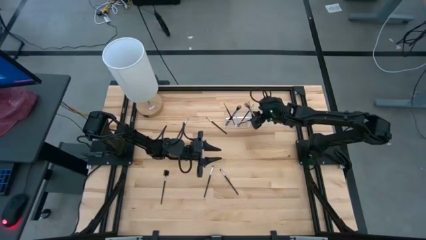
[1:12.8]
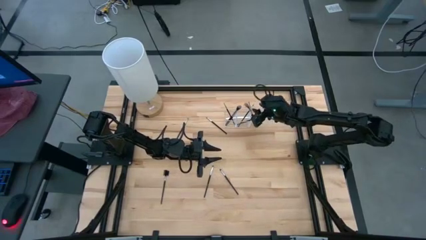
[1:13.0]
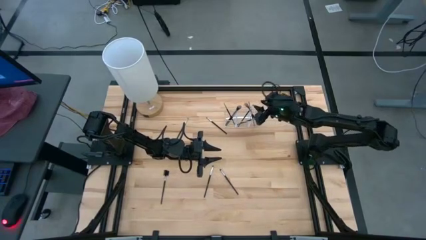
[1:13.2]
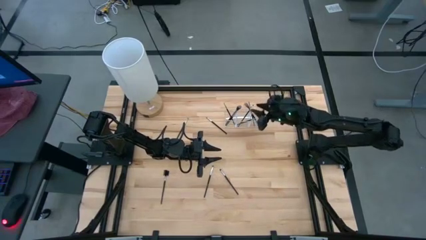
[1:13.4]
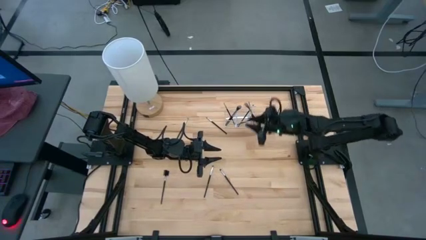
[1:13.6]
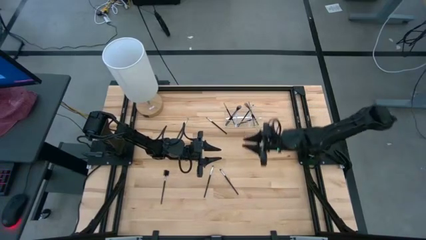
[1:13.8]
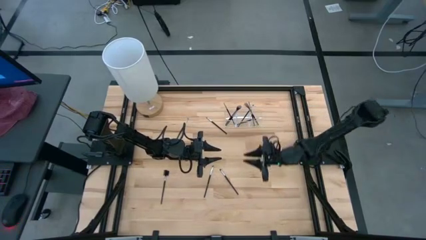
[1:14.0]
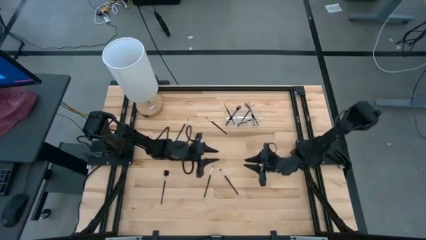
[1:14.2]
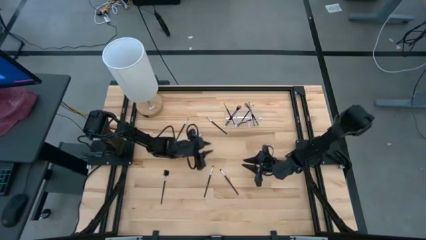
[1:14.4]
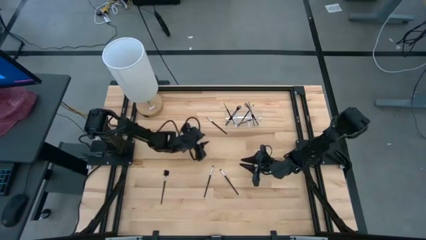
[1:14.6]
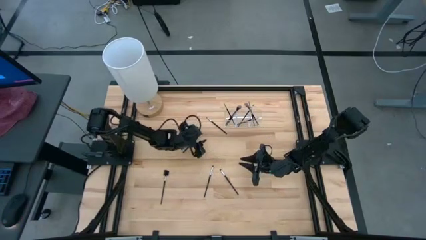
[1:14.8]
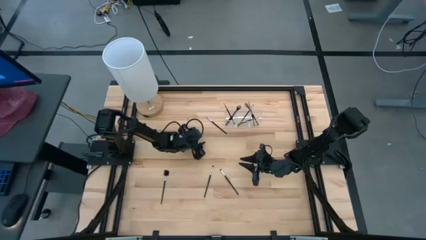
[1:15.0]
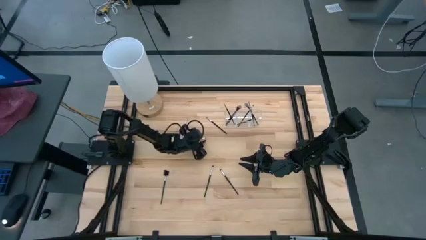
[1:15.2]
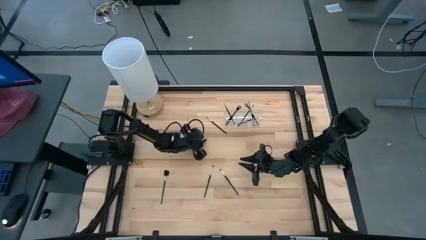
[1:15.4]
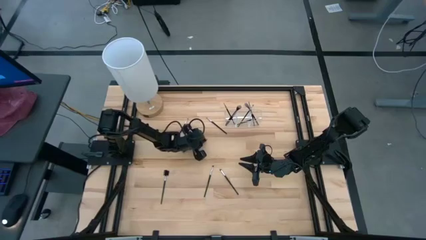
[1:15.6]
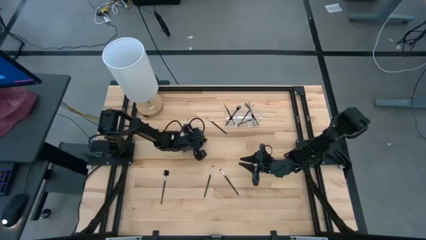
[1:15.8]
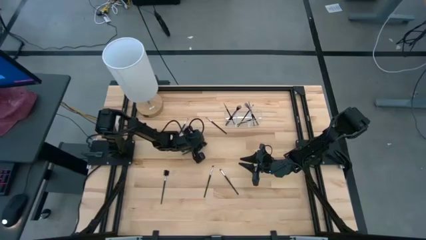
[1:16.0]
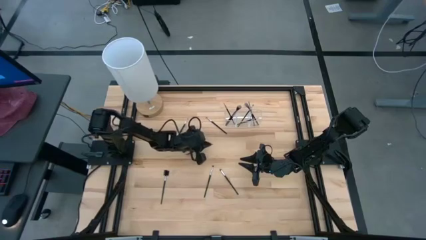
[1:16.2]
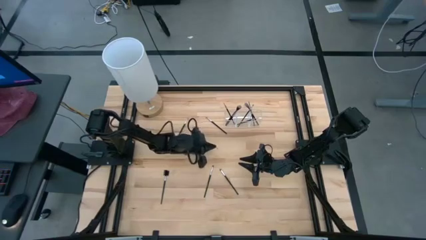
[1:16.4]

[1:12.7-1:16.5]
Task: Put items in baskets/containers
Put the black eyeshadow brush into the transparent organizer

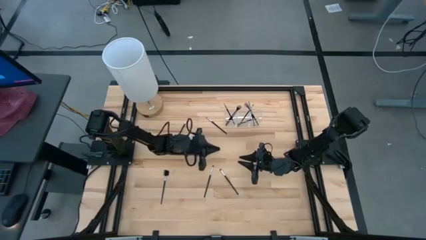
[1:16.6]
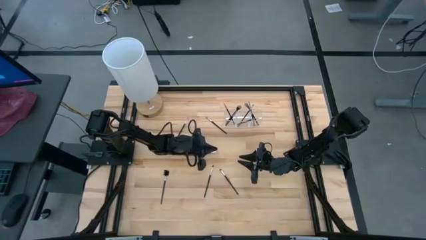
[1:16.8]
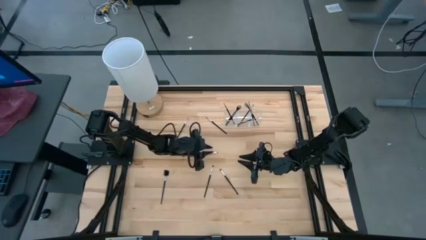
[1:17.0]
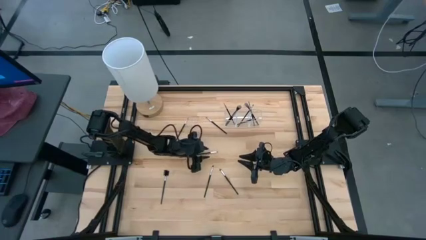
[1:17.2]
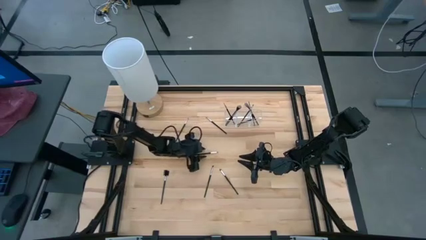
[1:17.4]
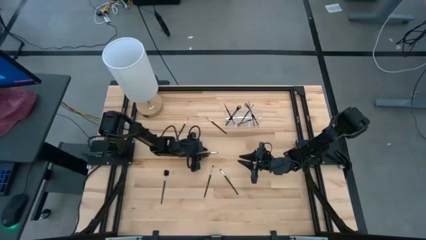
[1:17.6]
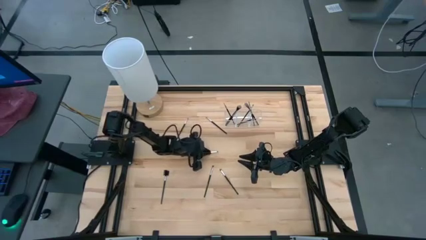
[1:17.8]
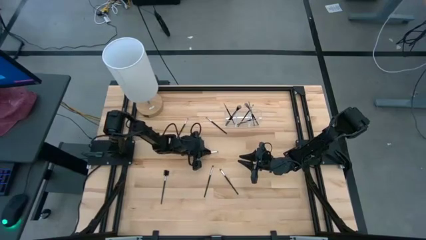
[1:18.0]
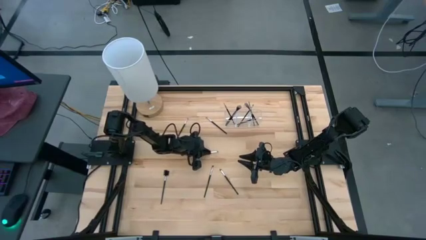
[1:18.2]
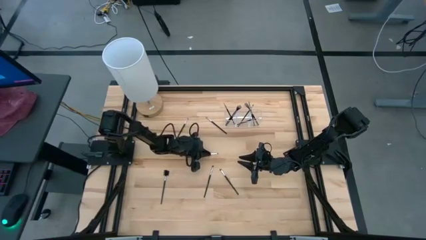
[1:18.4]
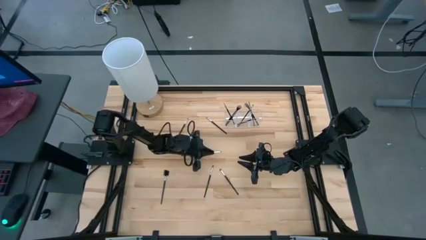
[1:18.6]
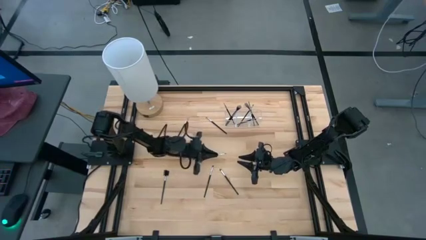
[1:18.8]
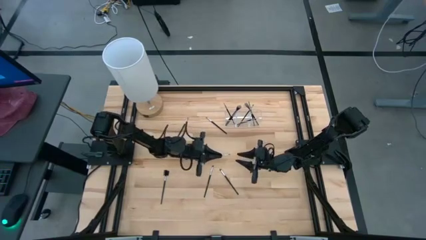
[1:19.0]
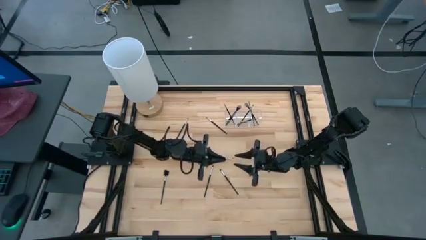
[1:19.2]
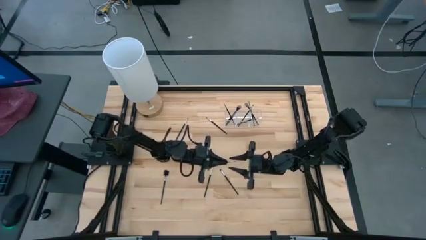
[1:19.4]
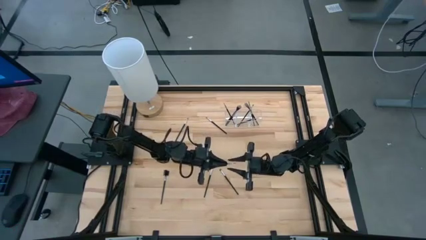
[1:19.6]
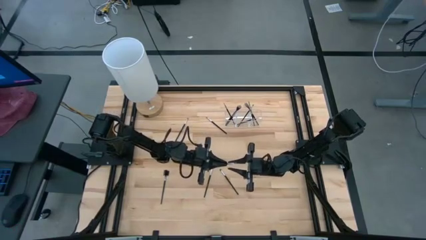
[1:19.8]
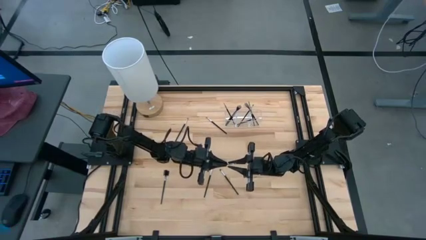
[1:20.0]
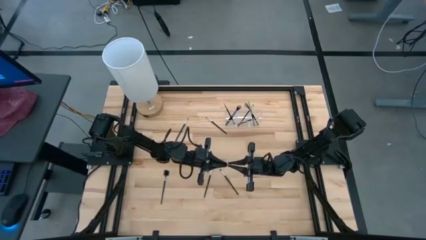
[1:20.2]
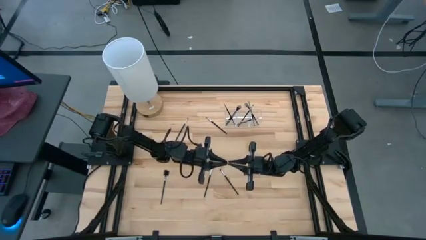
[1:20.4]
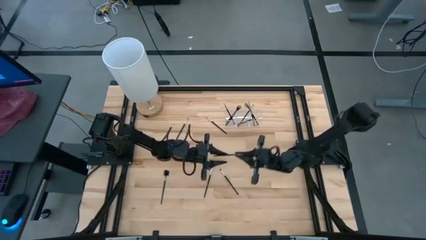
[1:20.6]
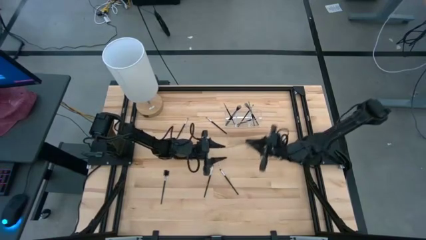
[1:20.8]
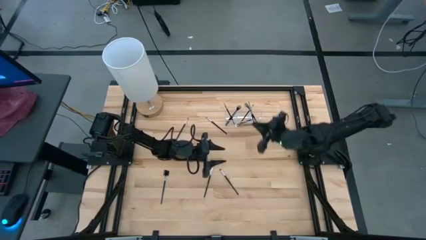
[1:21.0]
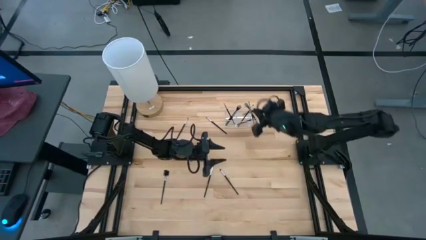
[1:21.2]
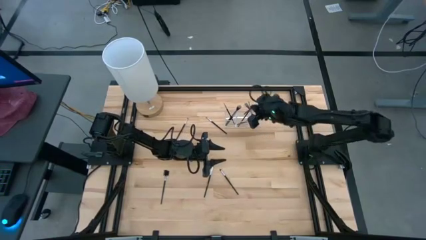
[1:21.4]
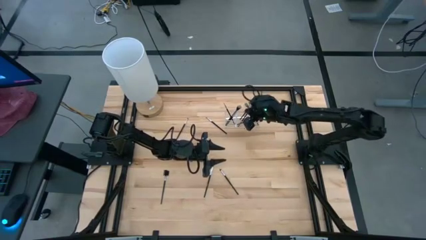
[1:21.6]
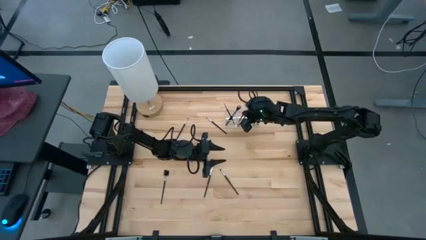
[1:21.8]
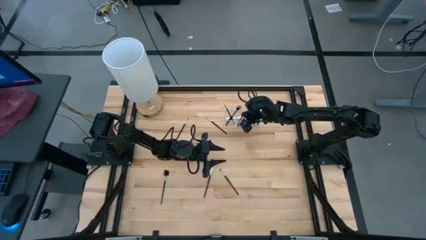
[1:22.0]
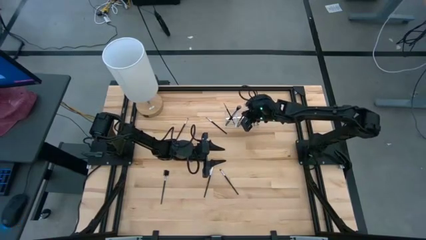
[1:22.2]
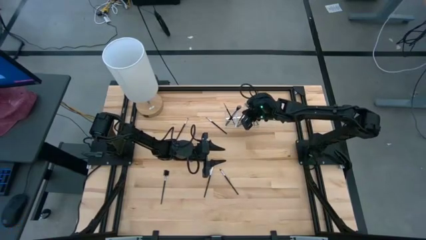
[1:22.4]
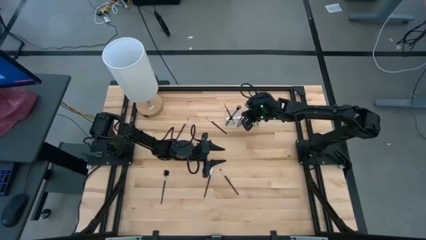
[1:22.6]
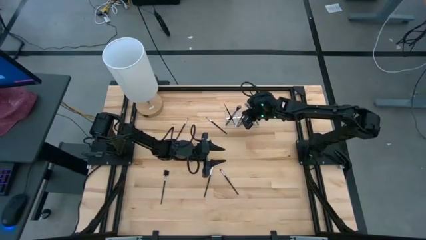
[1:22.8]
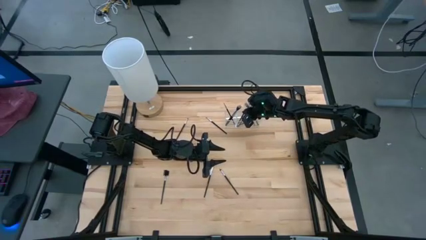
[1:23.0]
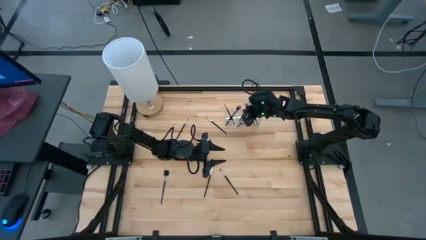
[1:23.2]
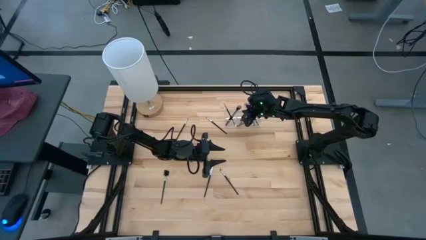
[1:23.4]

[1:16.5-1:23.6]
Put the black eyeshadow brush into the transparent organizer

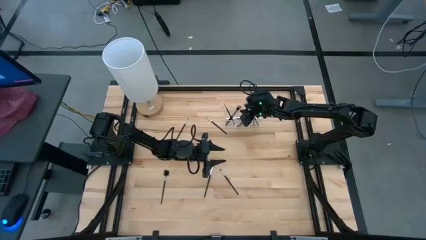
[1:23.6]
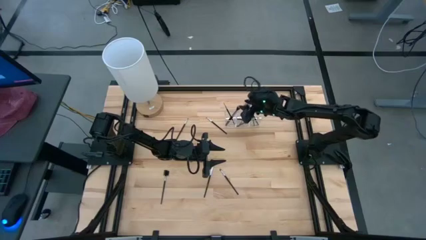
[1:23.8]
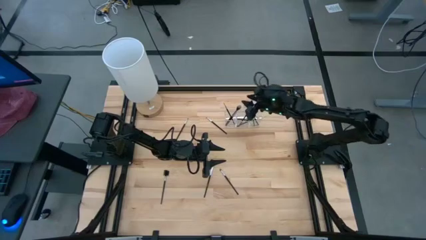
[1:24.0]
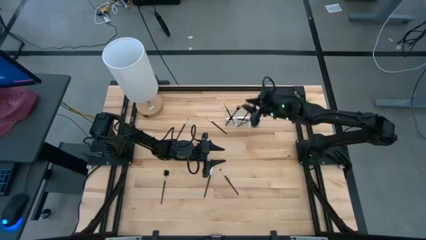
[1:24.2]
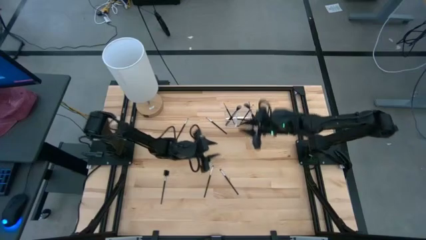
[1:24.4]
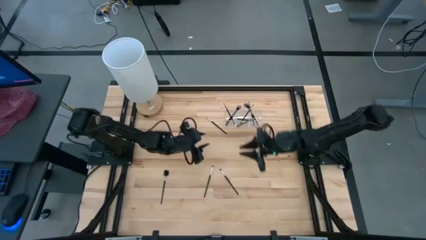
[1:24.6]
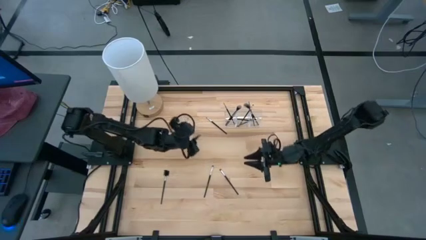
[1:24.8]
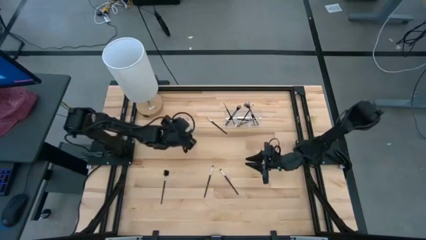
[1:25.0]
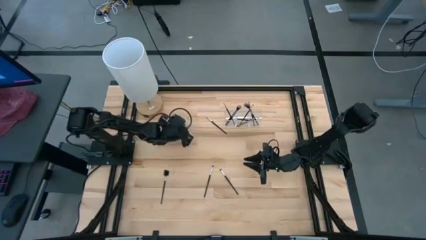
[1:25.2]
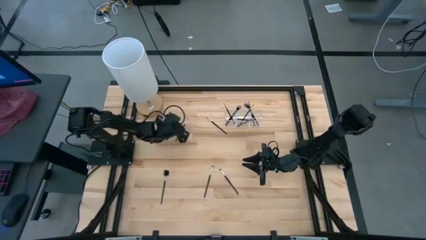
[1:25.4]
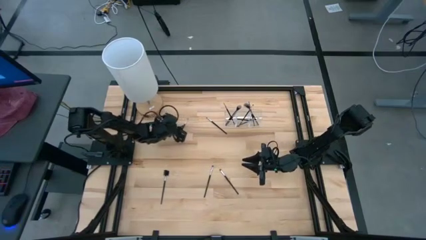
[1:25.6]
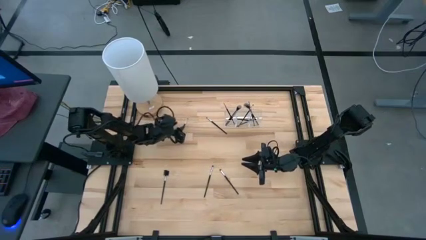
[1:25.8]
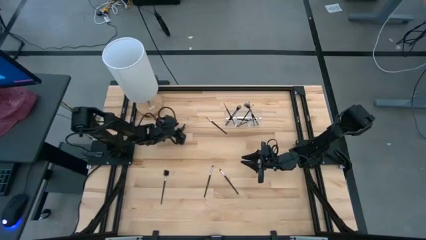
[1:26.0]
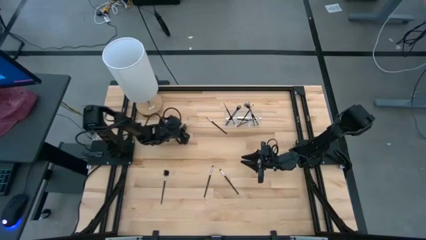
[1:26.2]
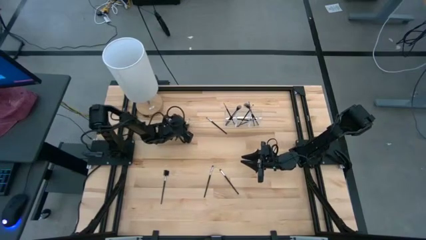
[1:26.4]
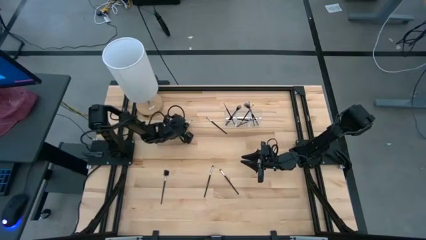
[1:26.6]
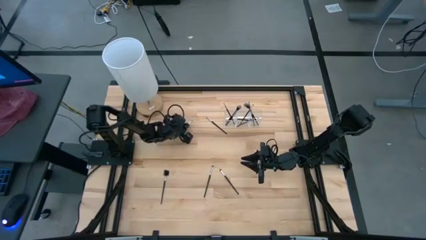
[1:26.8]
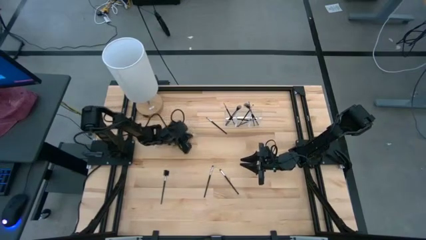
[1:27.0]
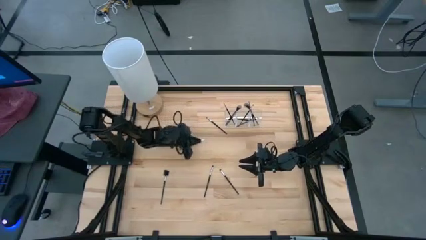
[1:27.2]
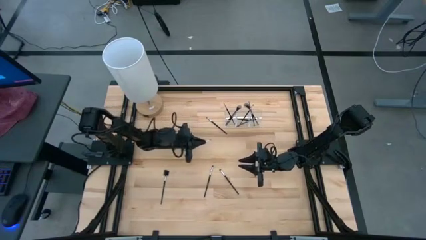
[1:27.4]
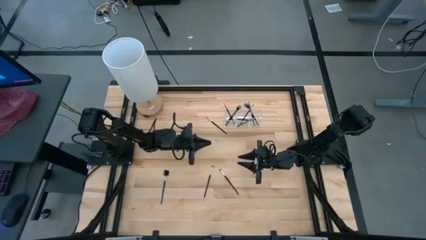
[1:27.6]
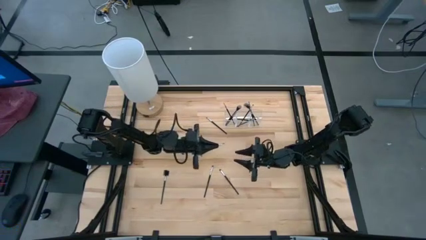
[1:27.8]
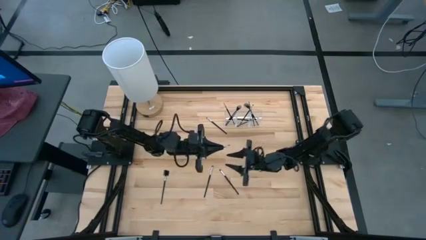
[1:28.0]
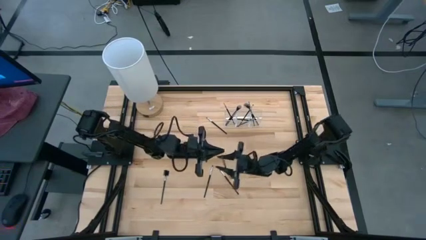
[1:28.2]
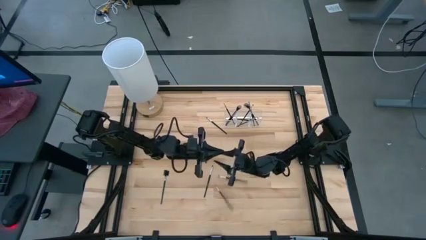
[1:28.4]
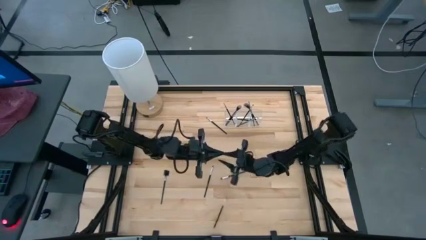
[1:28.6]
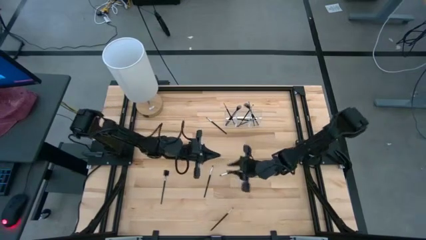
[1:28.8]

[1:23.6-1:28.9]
Put the black eyeshadow brush into the transparent organizer
